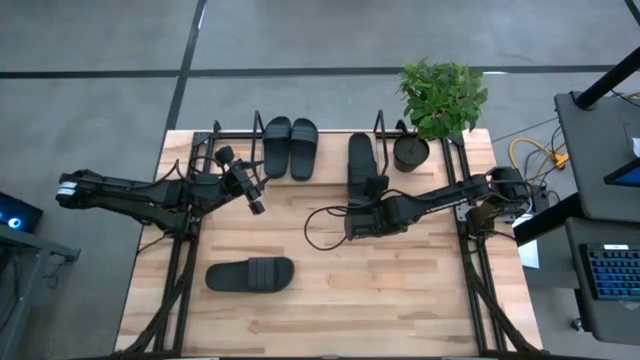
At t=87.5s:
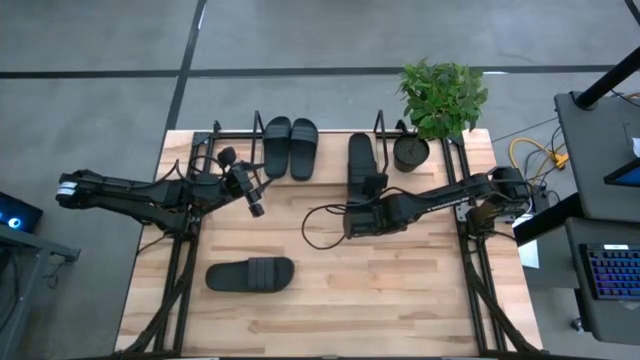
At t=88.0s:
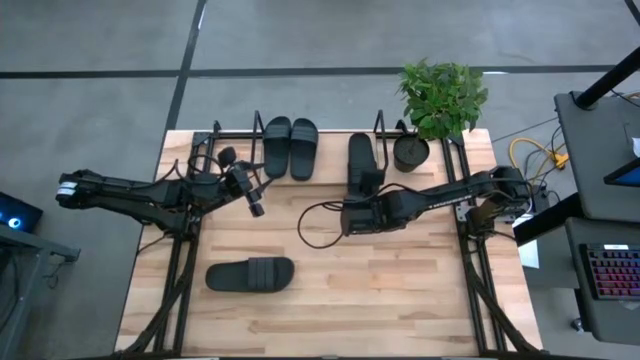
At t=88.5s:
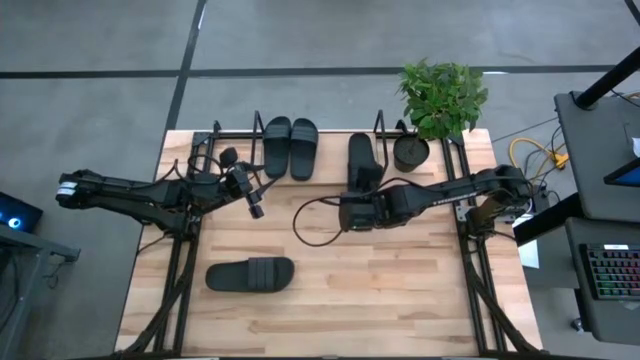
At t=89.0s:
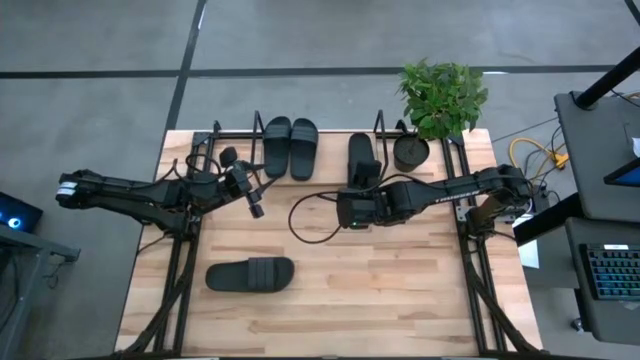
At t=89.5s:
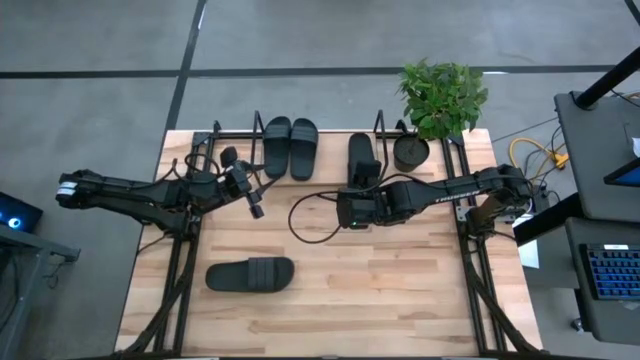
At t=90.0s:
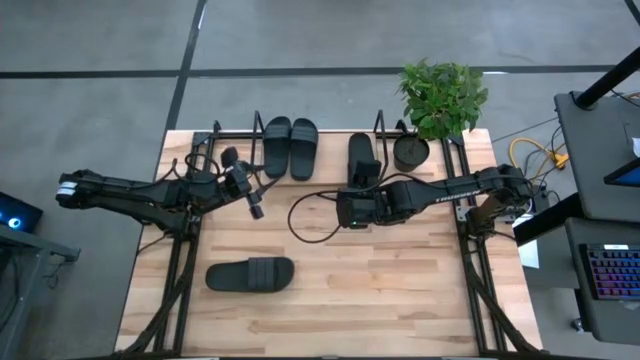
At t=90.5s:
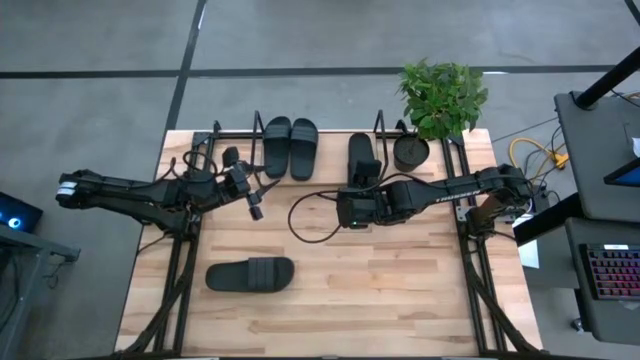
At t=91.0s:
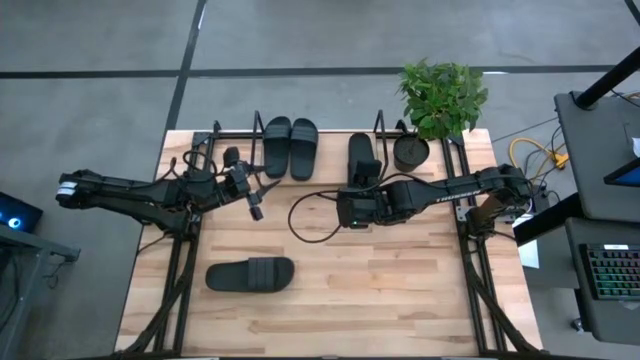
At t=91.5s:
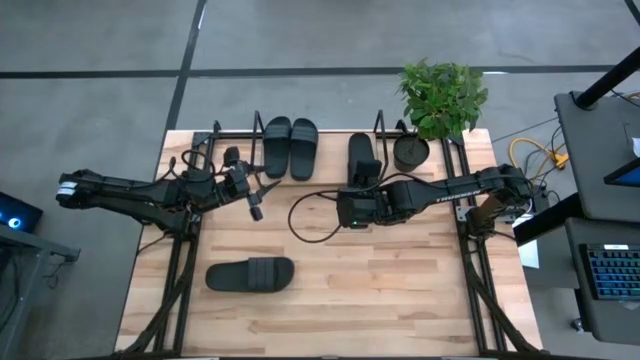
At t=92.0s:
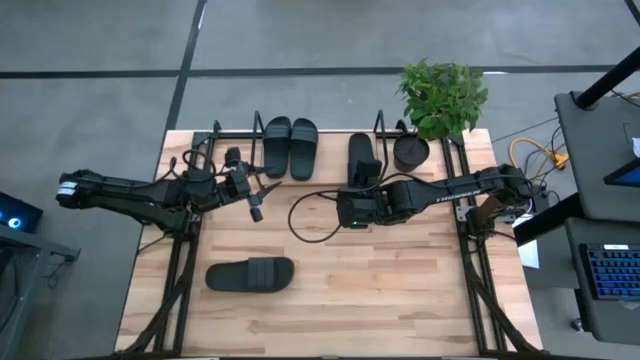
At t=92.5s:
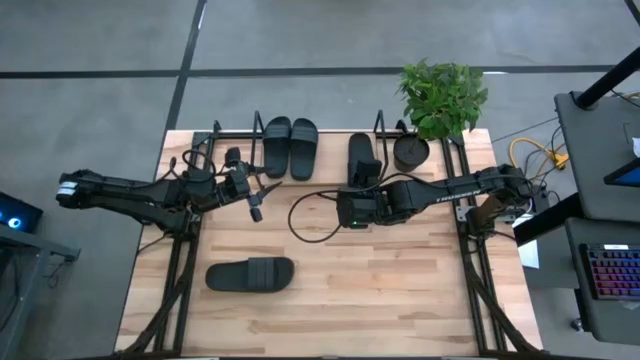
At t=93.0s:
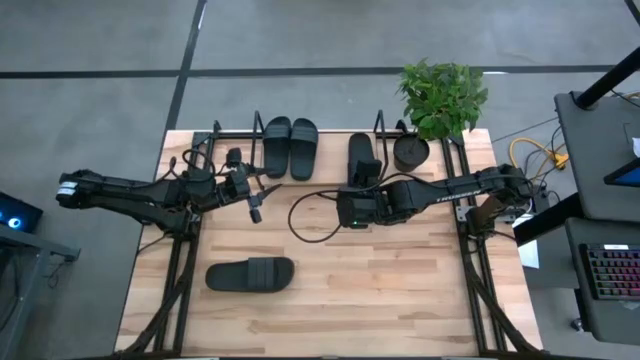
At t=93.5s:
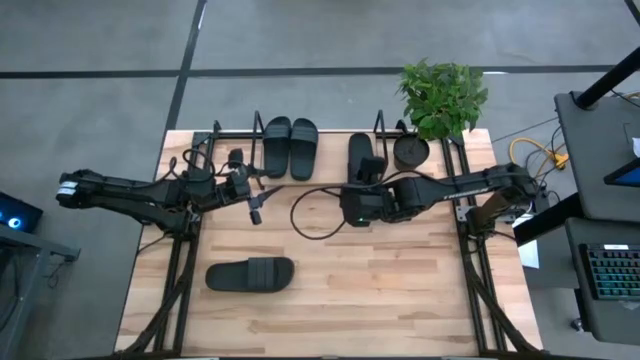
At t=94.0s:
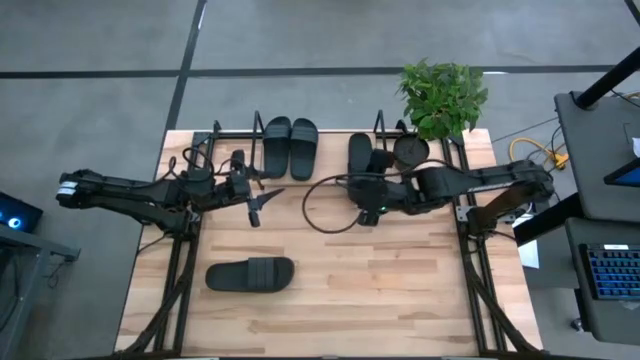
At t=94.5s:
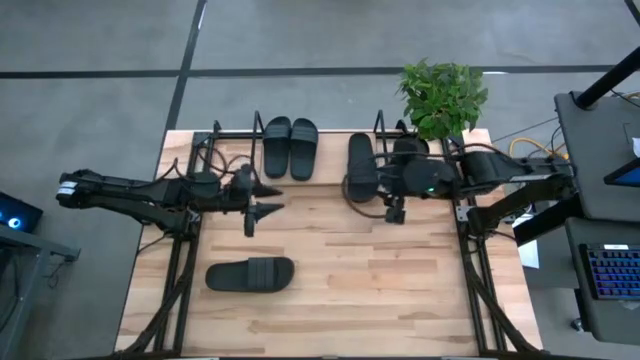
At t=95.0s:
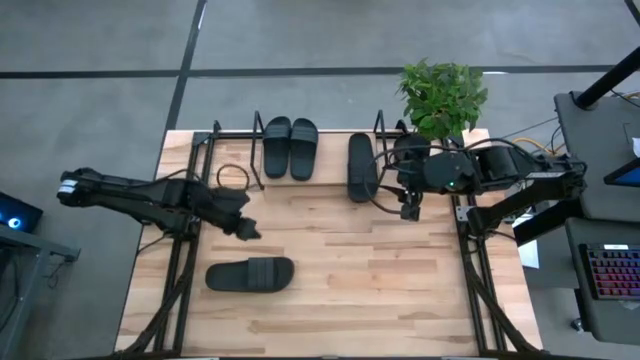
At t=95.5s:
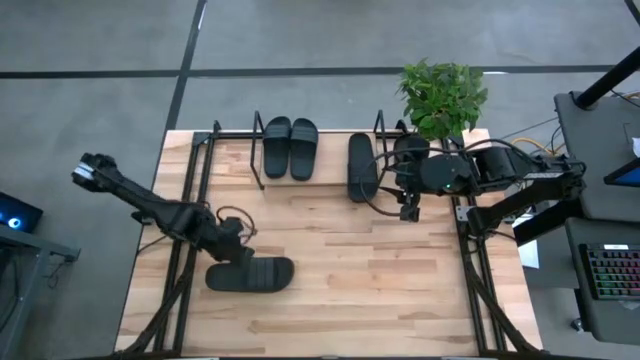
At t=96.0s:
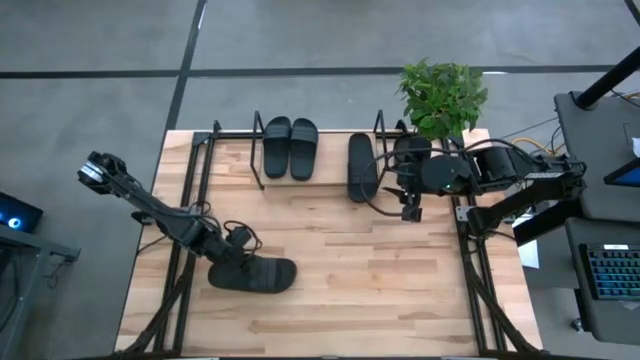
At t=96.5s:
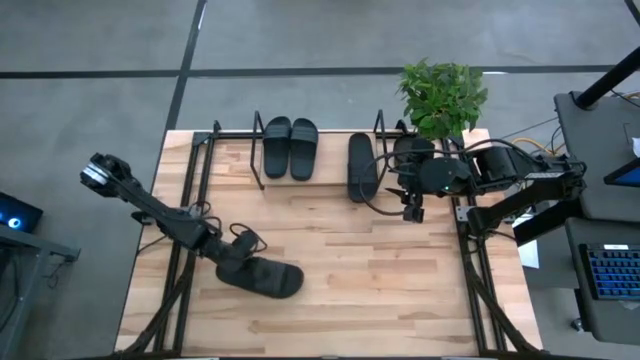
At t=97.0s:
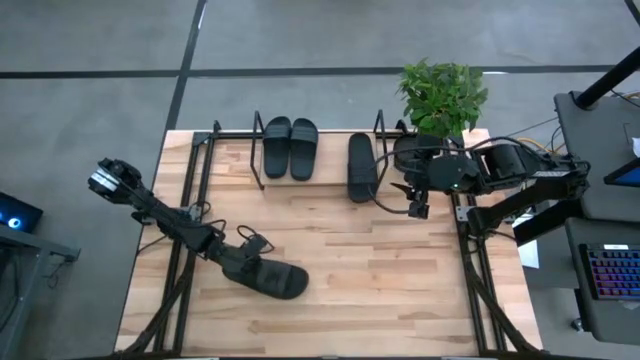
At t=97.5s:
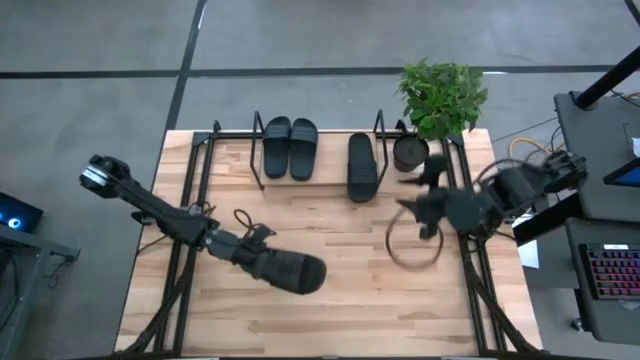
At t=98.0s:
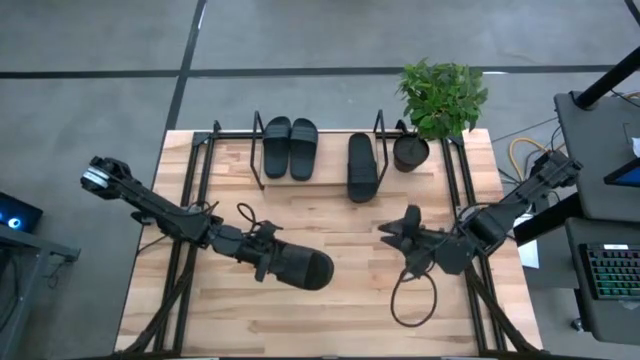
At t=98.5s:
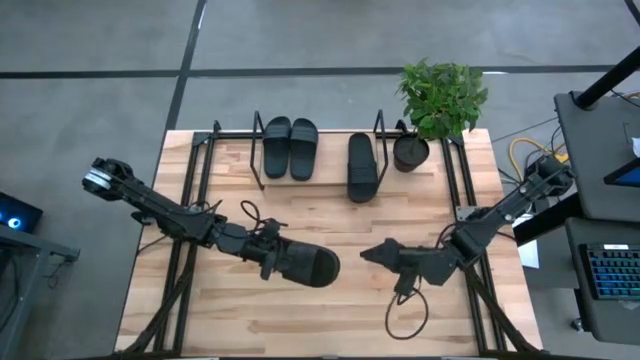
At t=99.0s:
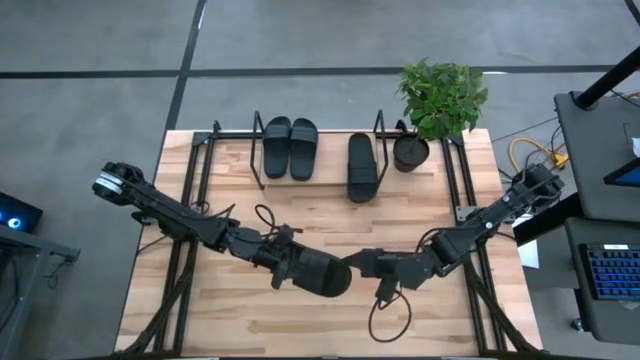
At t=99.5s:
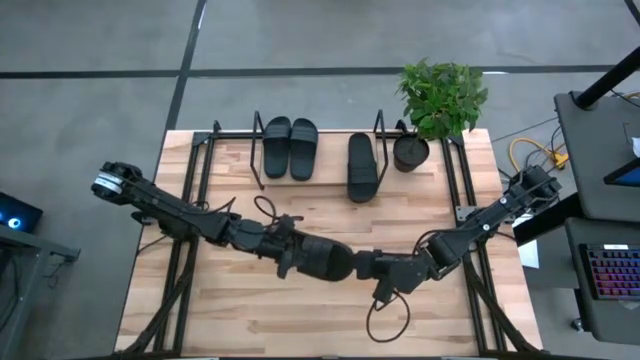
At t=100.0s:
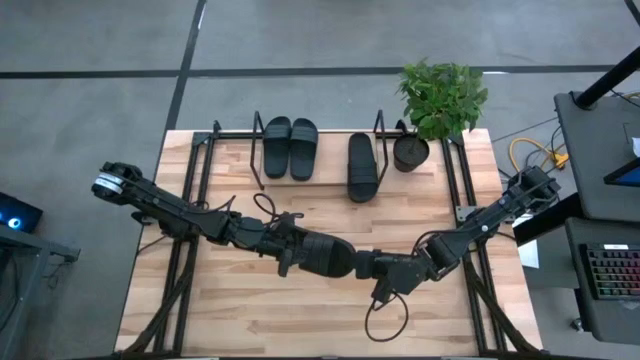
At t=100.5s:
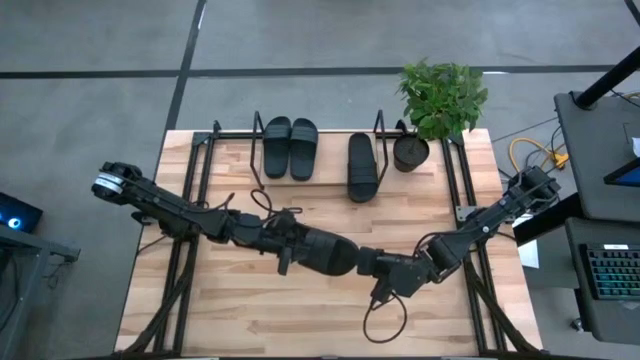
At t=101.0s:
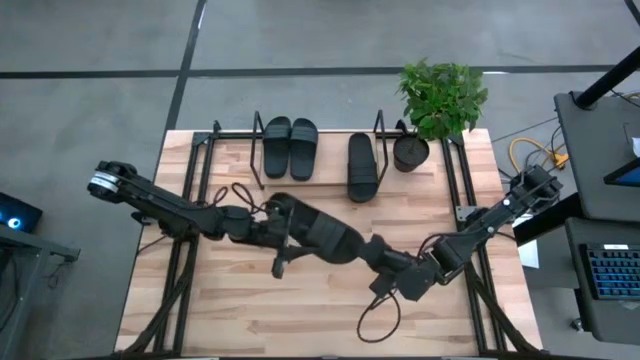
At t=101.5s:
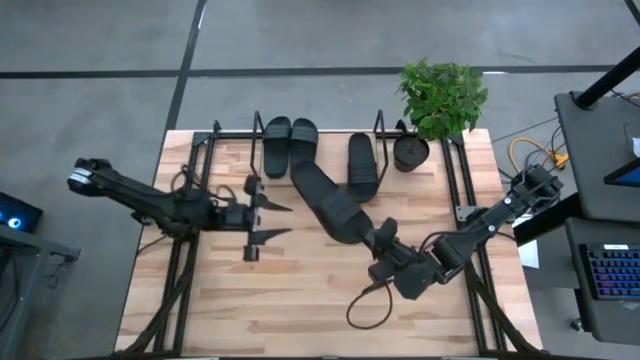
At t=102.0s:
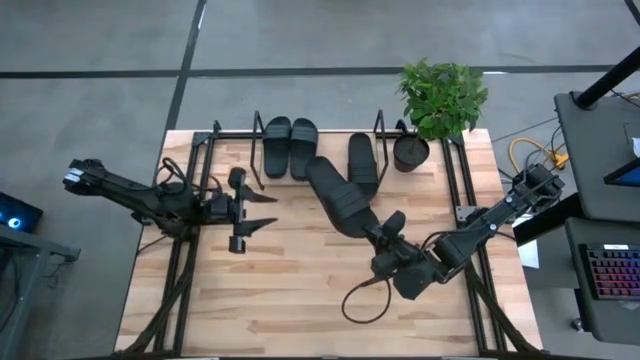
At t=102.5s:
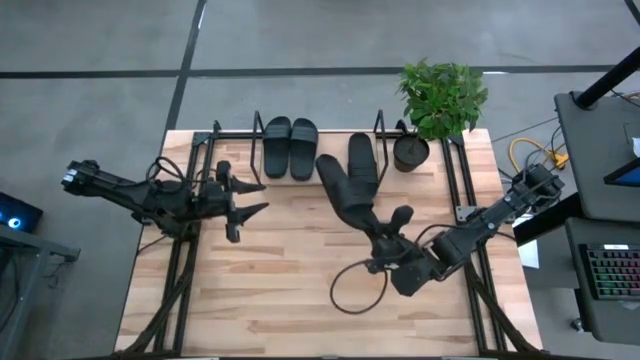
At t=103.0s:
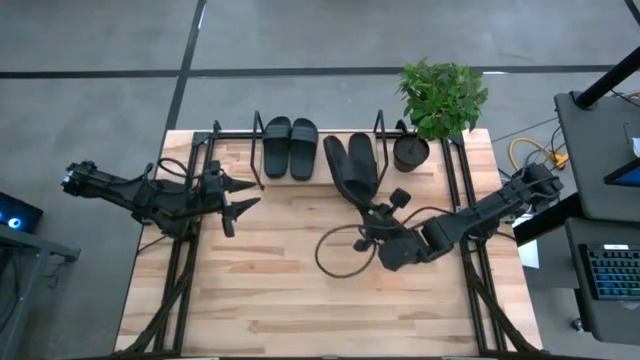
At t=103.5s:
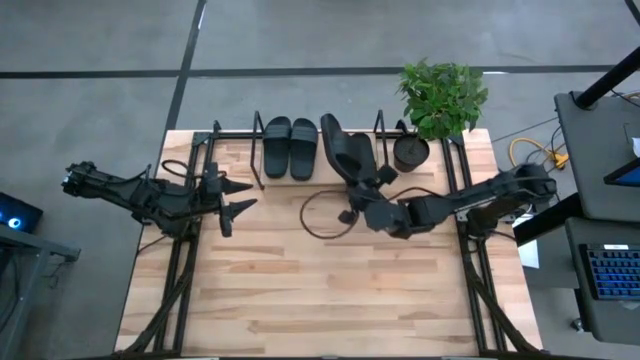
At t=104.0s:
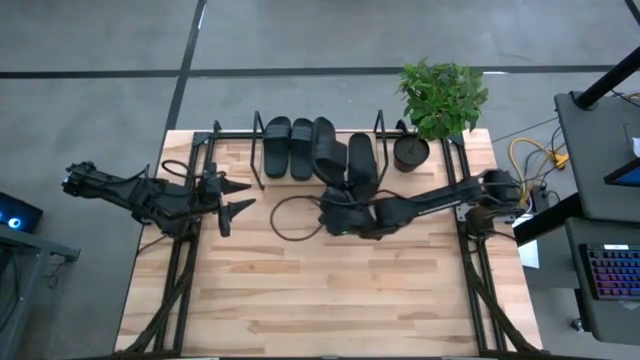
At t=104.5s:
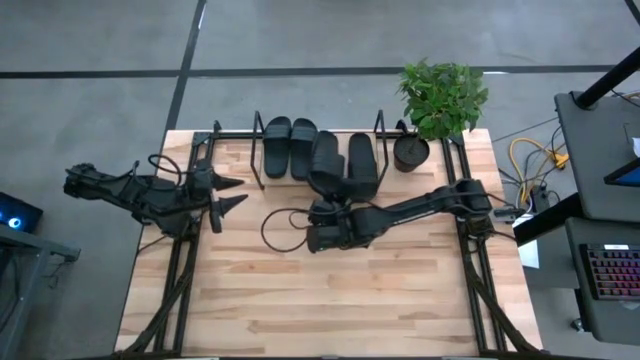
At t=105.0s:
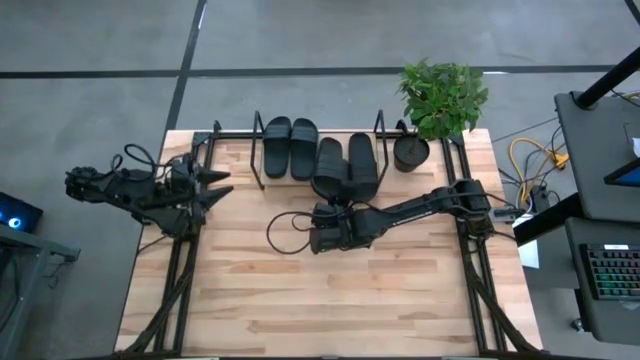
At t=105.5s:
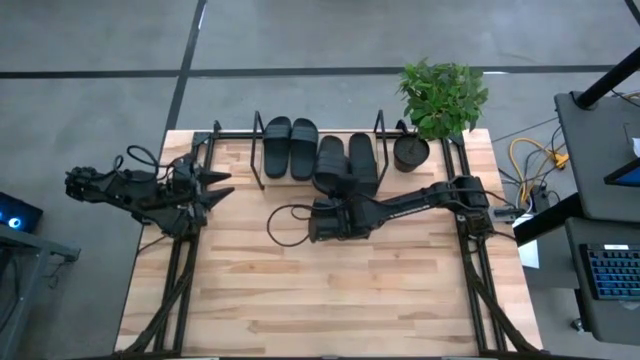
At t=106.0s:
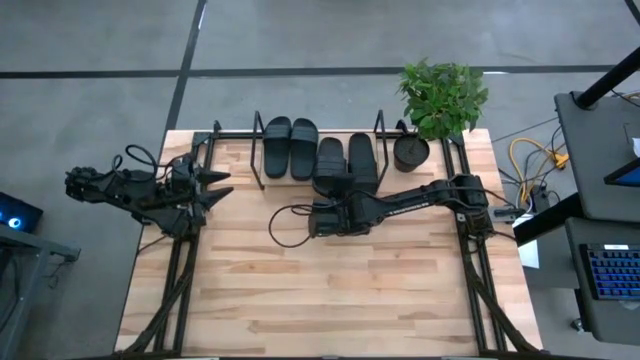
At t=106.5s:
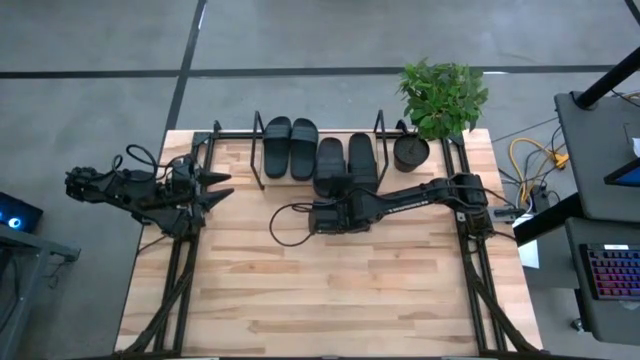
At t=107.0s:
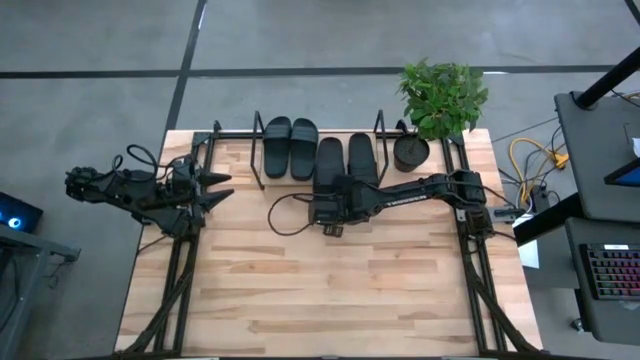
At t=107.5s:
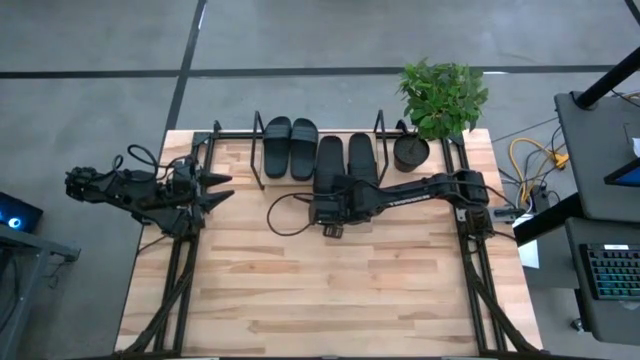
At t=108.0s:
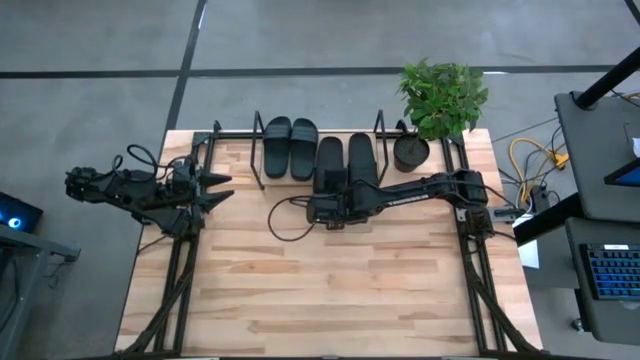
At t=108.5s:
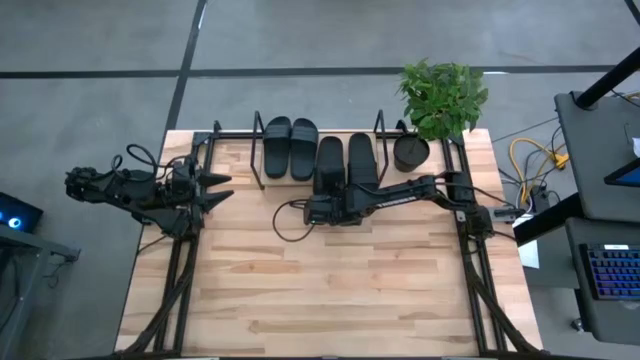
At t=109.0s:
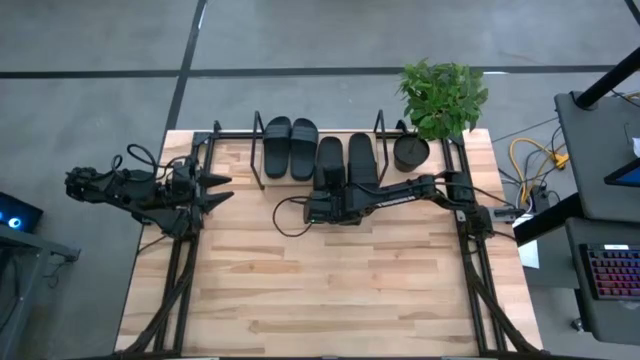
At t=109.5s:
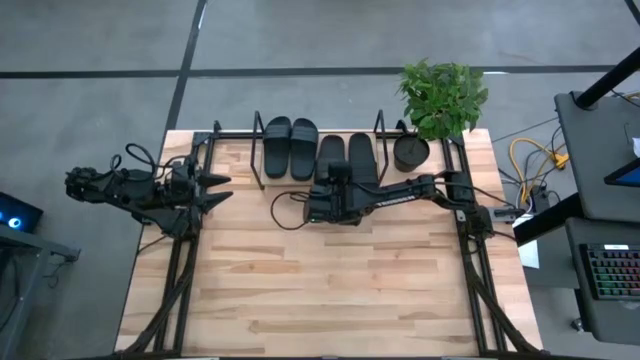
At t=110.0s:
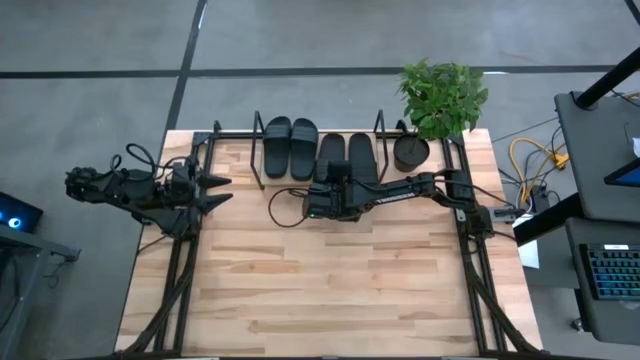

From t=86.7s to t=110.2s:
Task: Pick and place slides into the shelf
Put the black slide on the shelf
